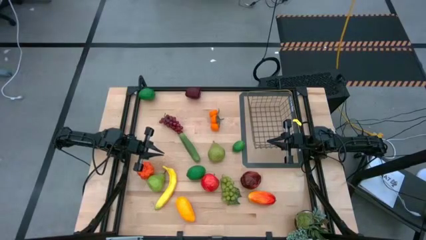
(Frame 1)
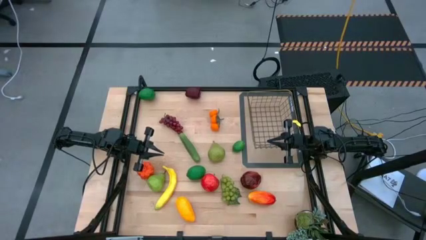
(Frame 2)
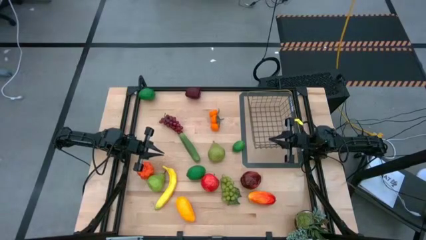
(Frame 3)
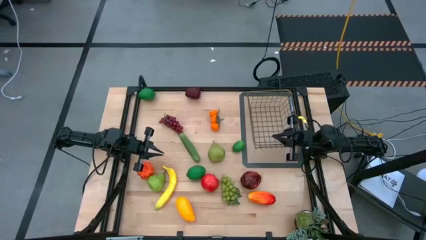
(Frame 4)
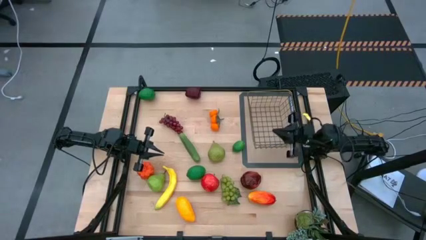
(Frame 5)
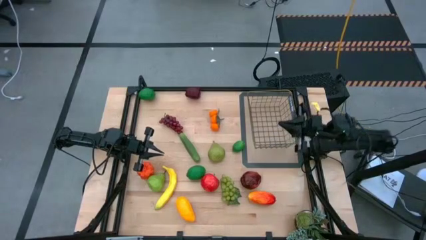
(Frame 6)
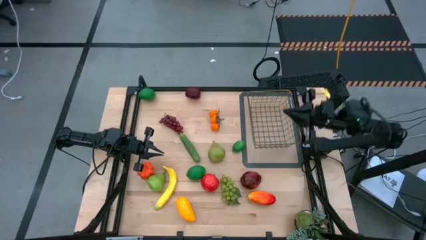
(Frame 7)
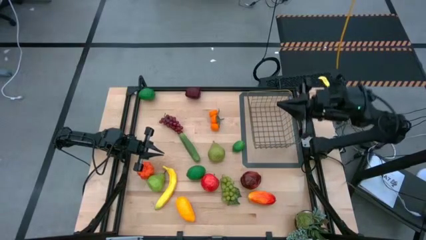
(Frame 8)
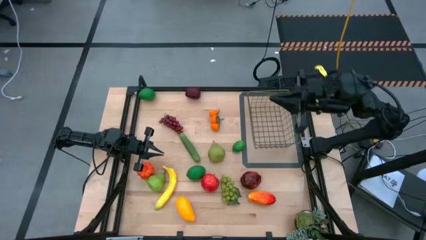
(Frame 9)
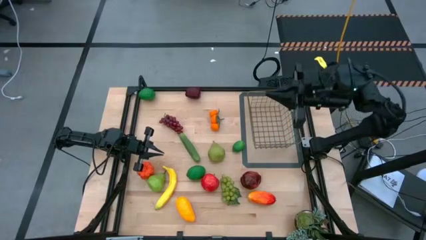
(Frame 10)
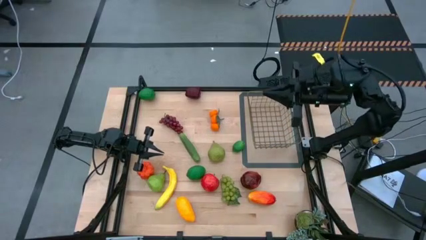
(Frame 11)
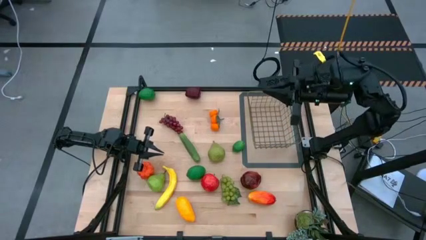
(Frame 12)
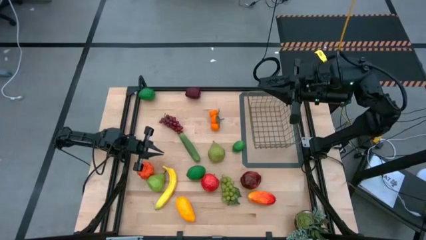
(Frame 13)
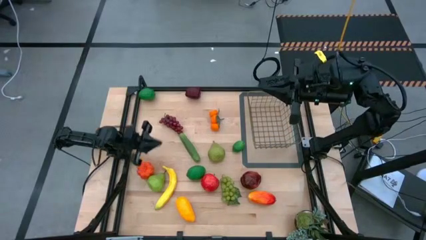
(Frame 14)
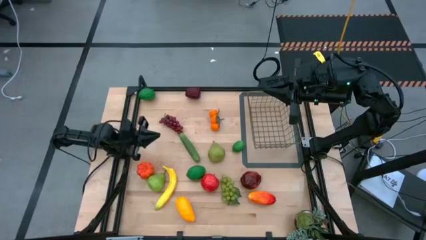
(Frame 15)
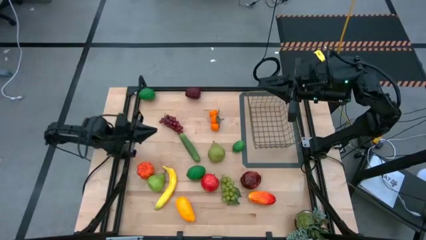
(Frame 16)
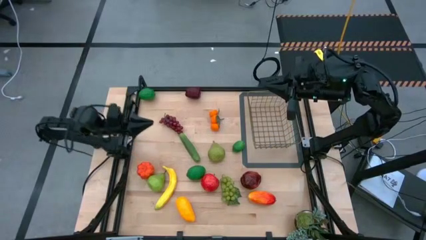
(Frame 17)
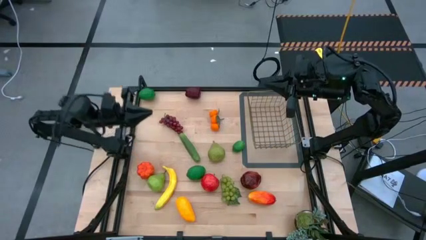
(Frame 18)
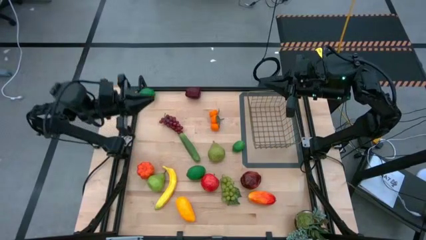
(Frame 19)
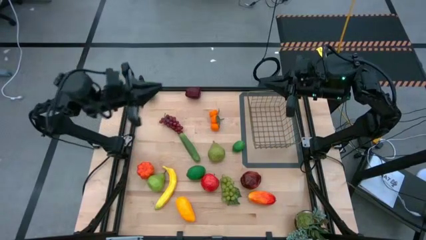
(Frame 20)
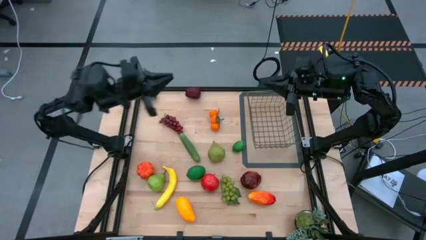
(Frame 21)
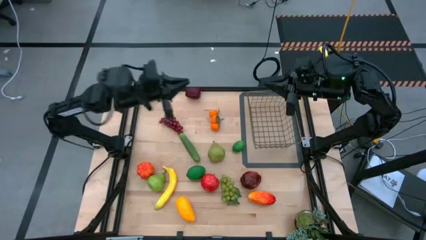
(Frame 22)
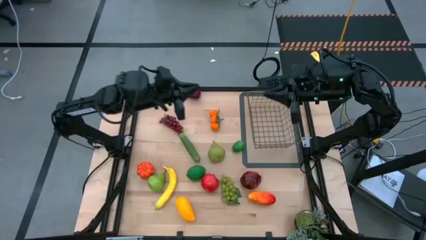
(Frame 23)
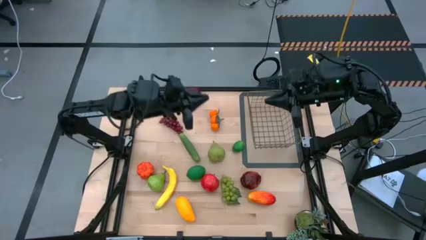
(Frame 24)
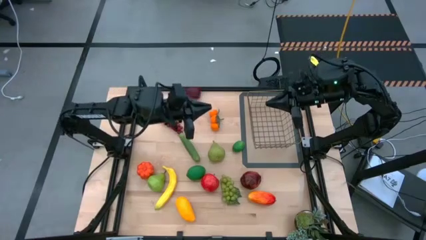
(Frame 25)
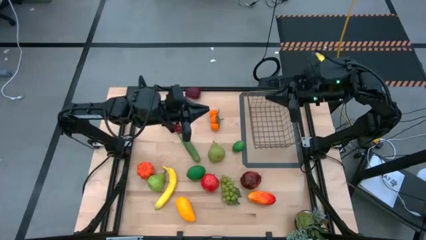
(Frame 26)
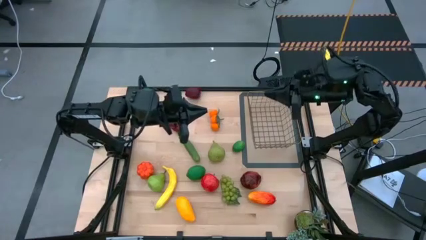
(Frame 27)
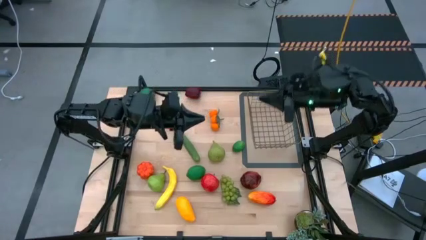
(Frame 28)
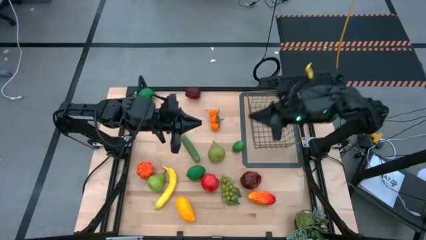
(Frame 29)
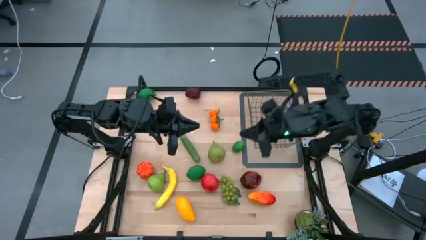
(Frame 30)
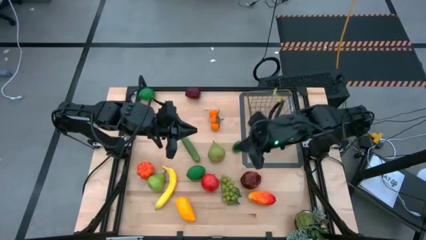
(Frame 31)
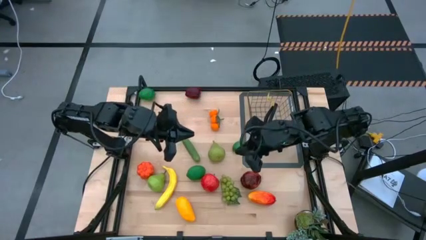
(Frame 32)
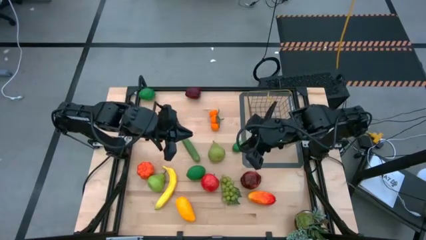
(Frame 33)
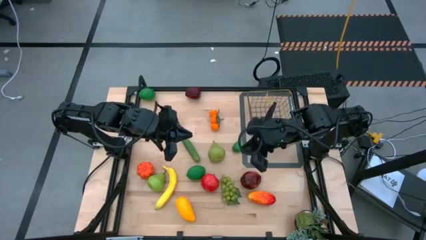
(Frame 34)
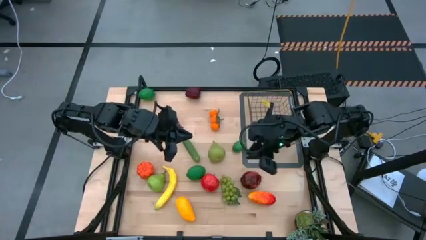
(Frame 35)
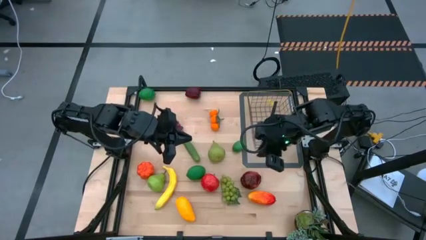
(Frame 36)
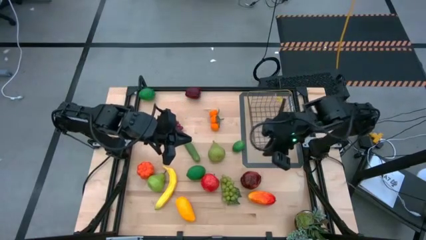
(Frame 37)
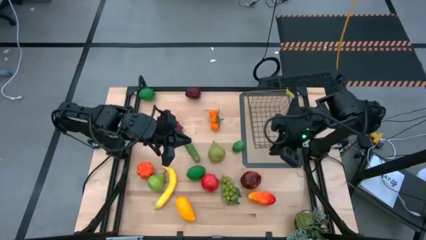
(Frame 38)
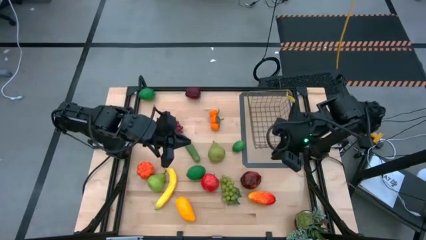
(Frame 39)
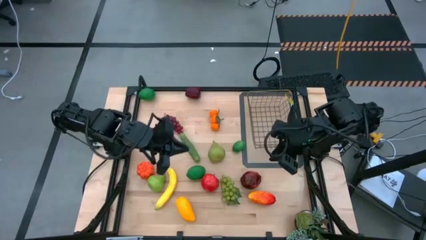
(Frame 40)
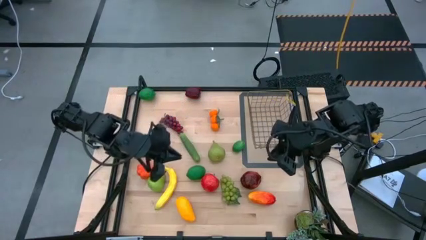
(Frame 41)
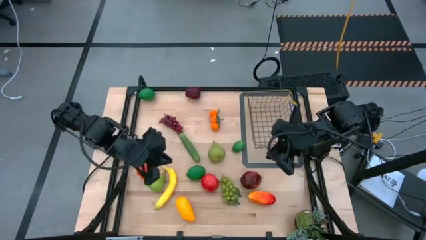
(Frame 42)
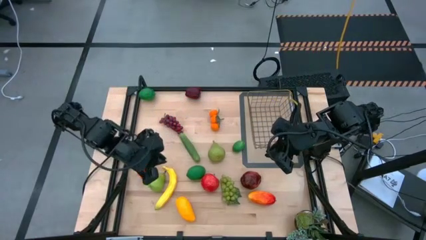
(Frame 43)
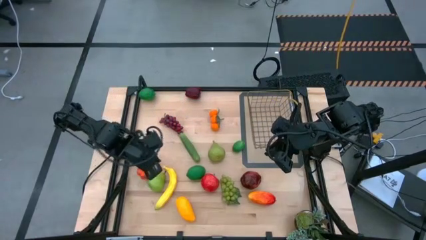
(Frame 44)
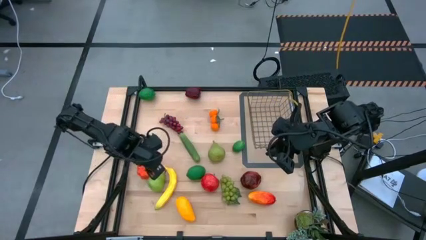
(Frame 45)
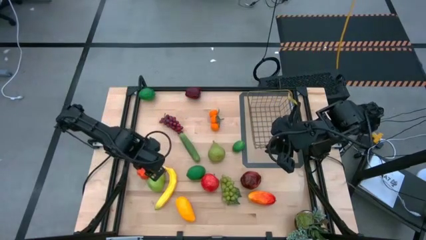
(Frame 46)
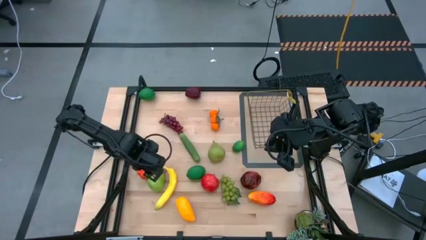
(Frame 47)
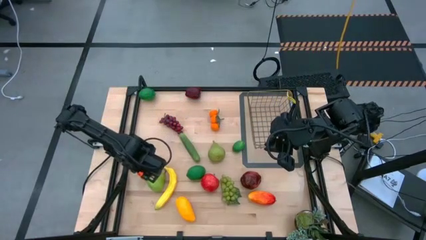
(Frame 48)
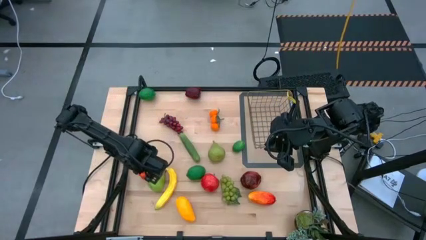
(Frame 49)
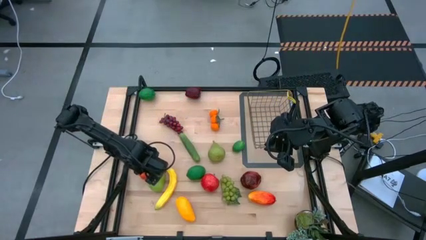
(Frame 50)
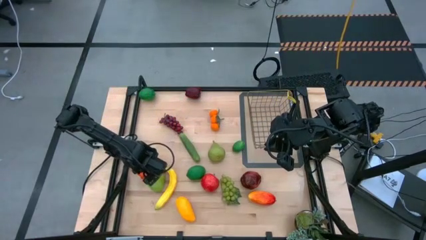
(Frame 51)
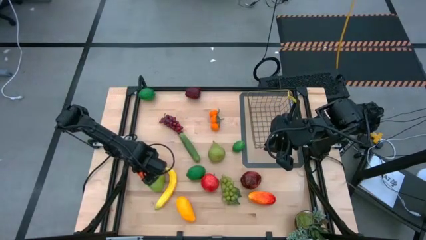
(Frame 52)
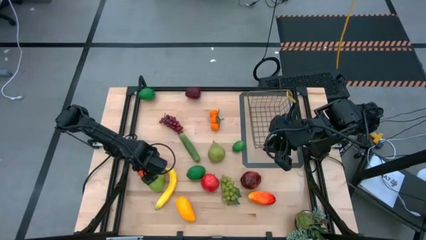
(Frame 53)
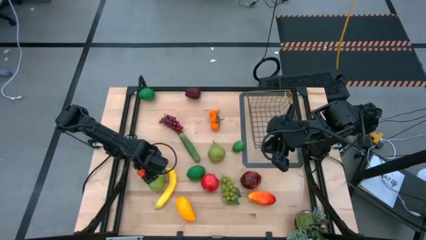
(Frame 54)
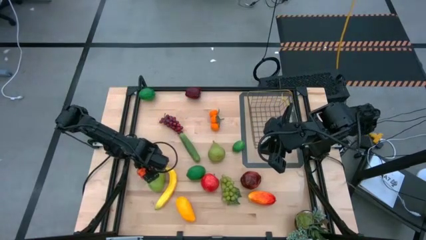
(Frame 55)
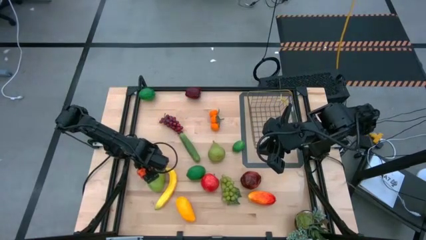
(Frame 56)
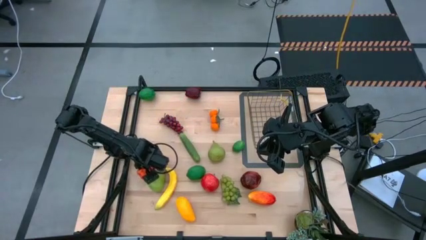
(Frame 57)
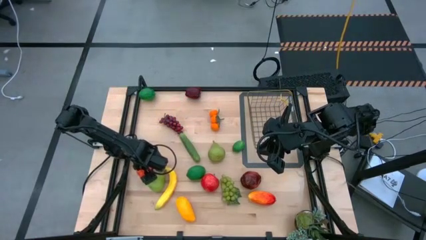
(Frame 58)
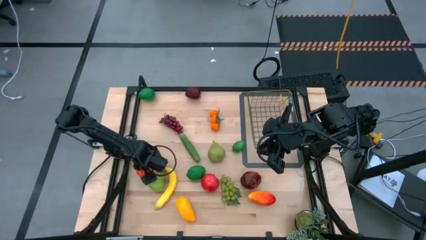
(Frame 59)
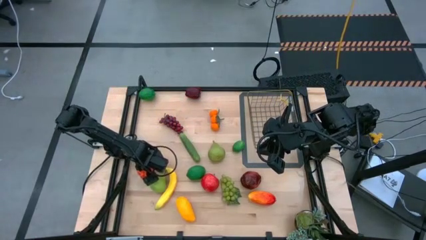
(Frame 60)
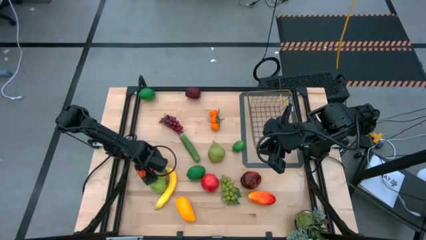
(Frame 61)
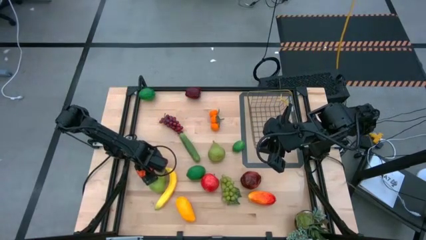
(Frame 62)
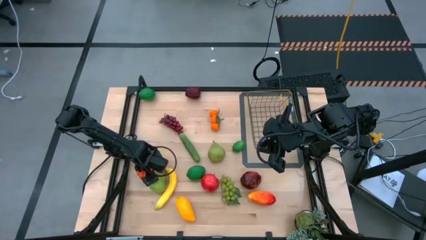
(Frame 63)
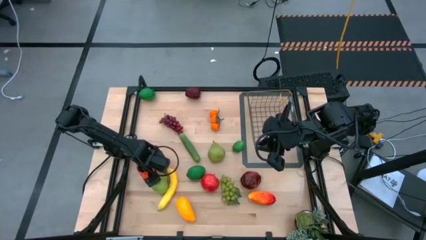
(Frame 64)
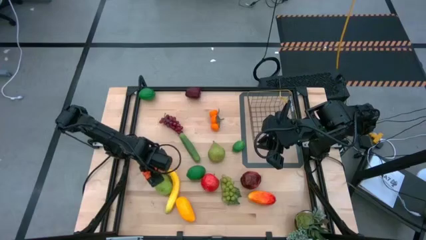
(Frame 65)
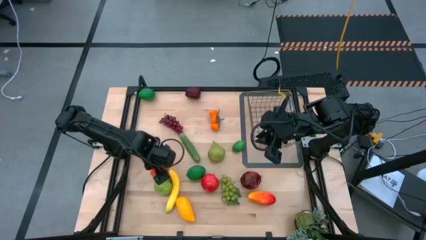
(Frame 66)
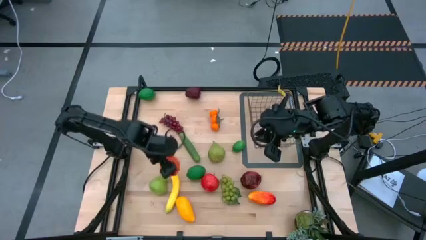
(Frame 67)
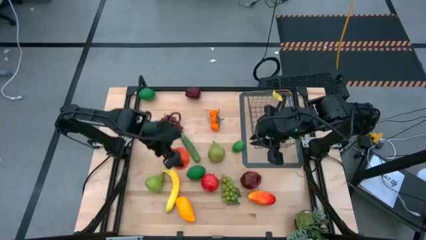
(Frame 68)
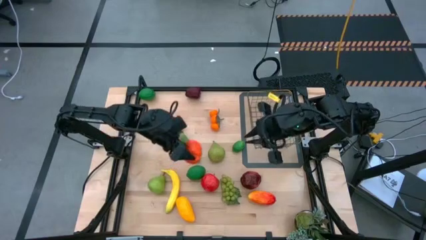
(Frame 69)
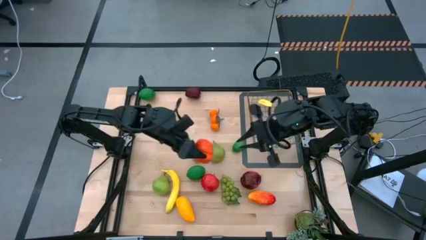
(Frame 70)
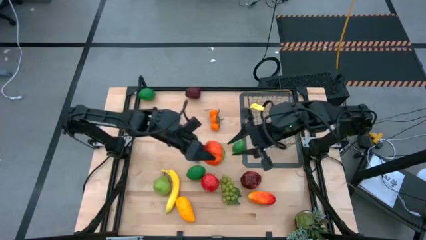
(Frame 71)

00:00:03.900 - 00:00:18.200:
Task: Build produce basket
Put the orange pumpkin into the wire basket

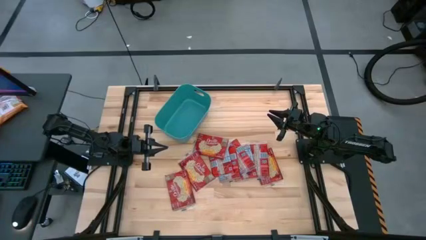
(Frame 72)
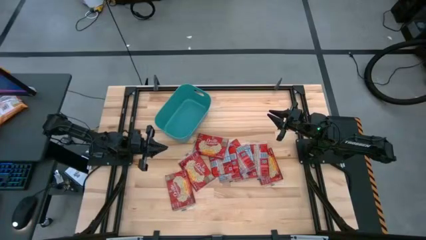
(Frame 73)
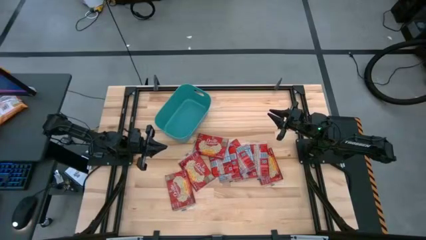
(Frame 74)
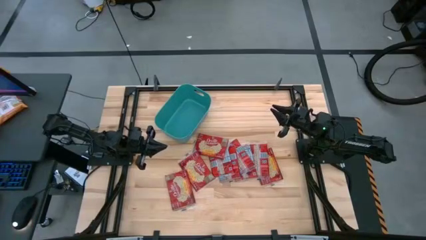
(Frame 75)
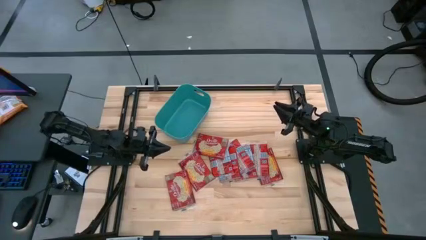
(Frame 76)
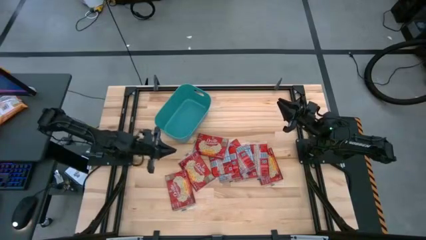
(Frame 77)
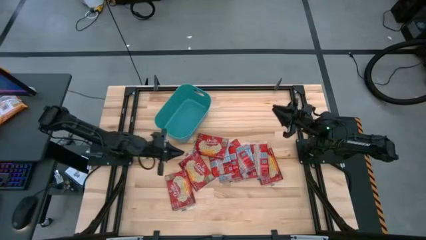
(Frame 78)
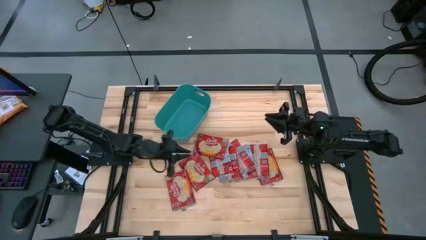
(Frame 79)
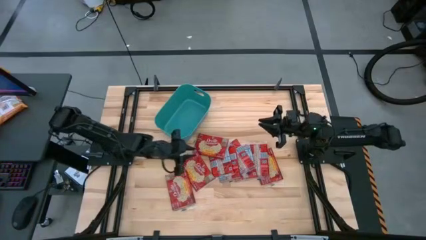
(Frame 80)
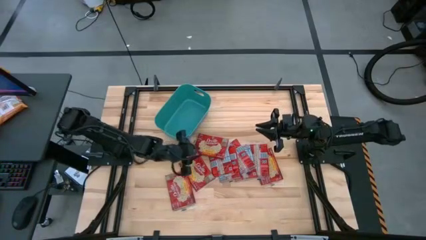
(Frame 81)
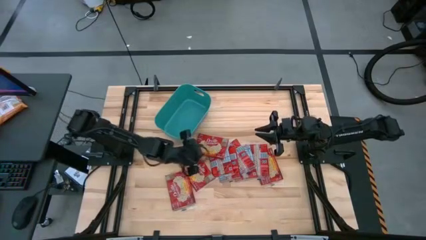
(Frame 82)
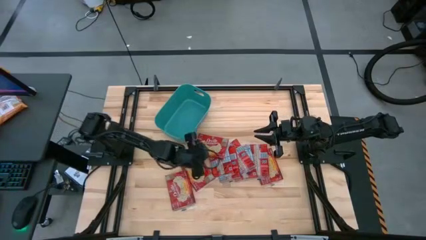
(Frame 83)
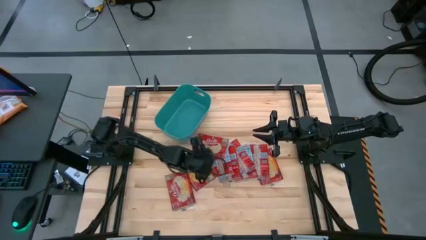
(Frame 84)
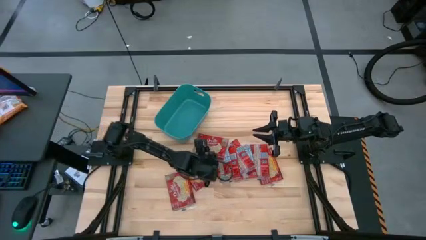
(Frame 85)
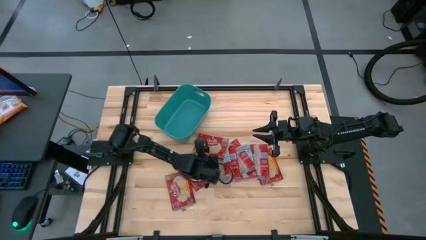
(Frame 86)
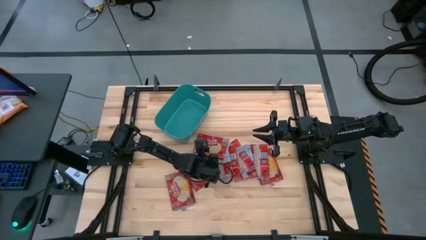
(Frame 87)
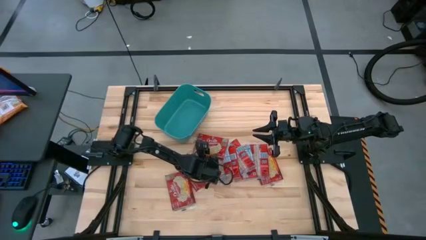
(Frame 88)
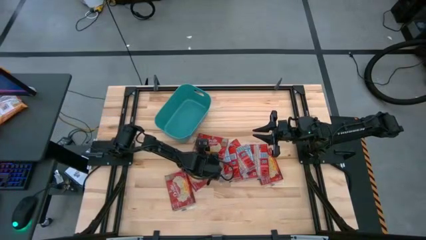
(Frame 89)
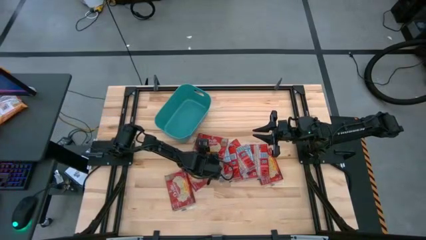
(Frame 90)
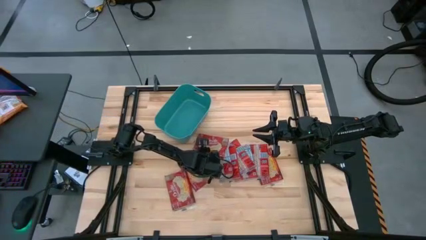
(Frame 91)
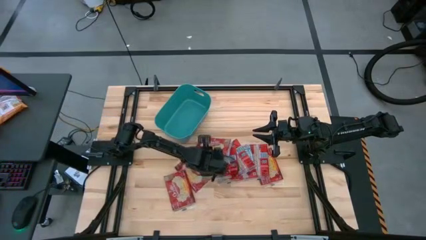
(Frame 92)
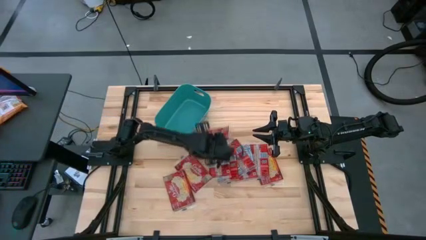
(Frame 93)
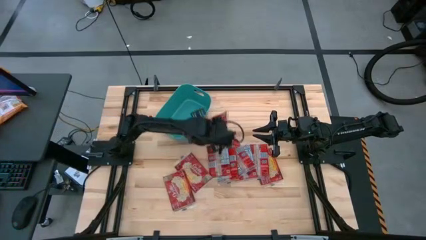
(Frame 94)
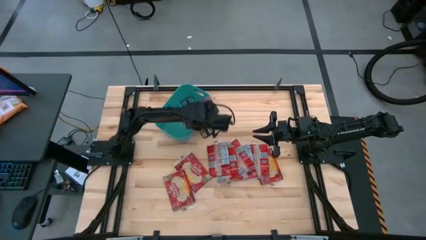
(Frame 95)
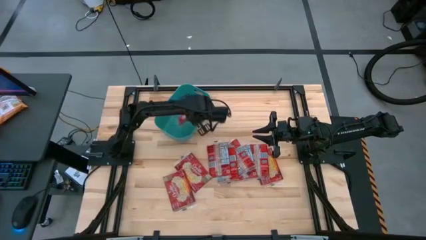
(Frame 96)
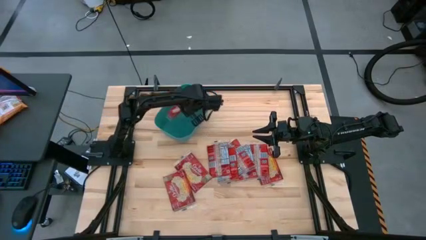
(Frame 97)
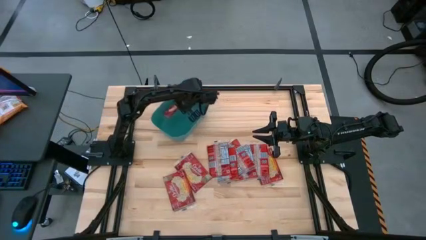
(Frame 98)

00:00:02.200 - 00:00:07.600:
Task: Sort popcorn bags into baskets
Put the red popcorn bag into the blue bin
